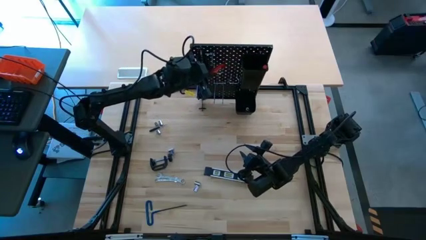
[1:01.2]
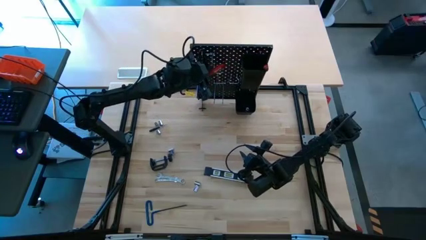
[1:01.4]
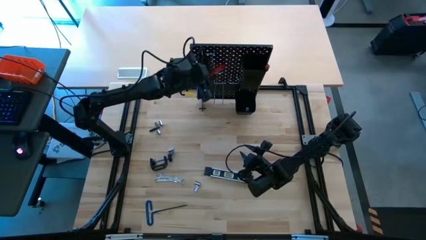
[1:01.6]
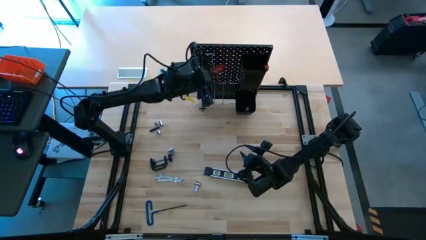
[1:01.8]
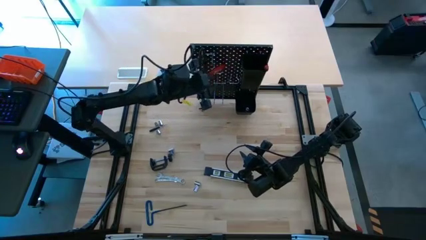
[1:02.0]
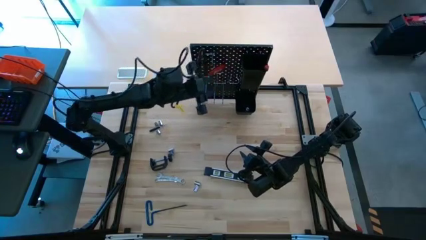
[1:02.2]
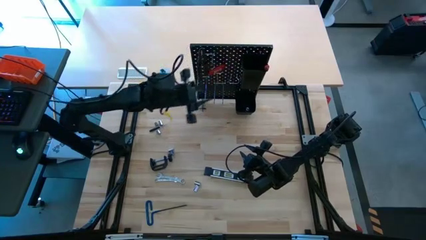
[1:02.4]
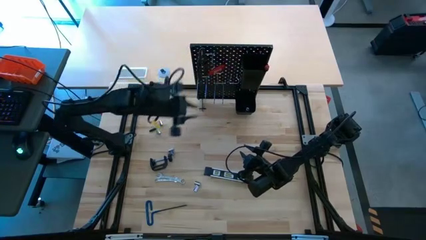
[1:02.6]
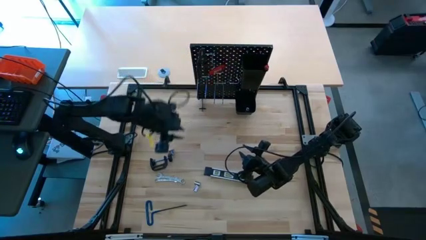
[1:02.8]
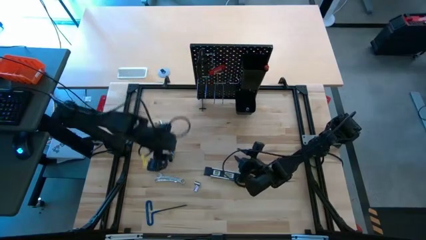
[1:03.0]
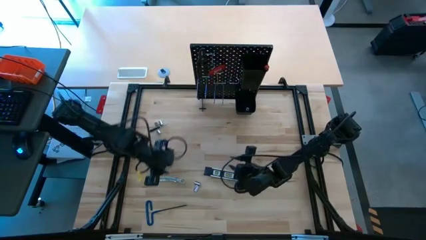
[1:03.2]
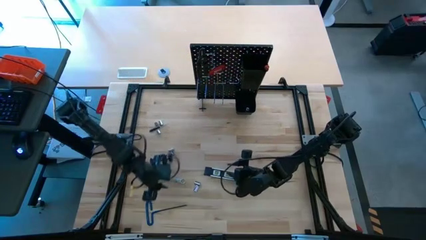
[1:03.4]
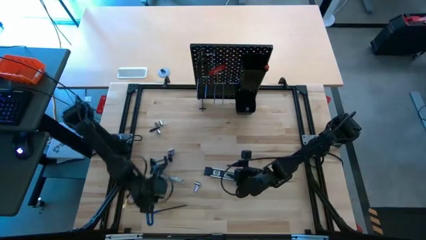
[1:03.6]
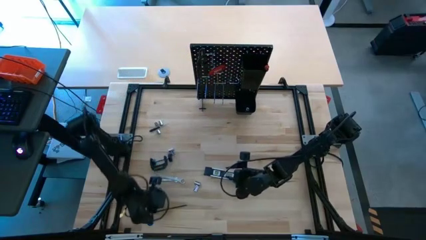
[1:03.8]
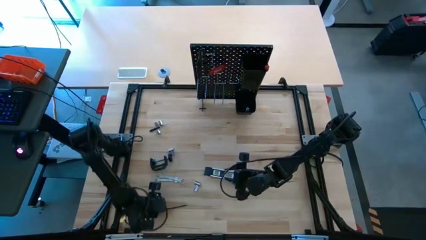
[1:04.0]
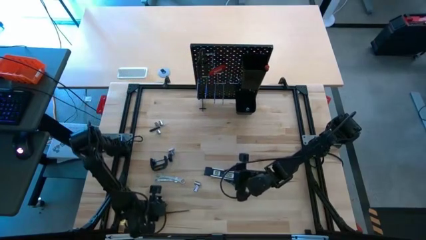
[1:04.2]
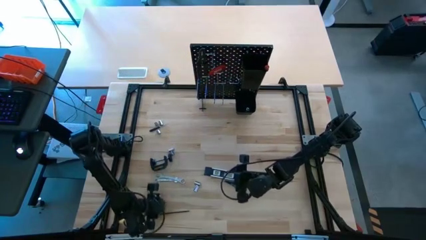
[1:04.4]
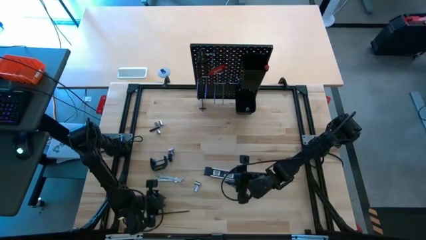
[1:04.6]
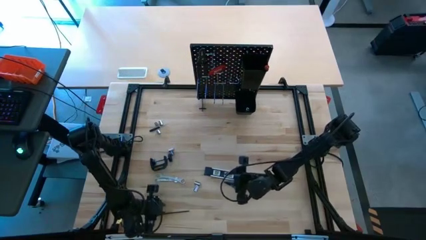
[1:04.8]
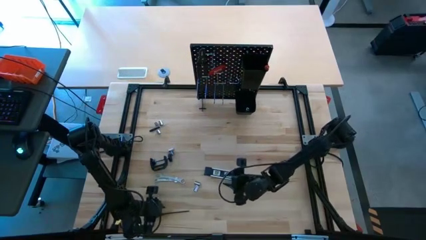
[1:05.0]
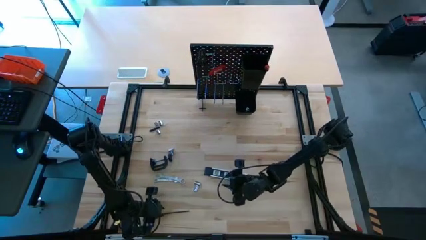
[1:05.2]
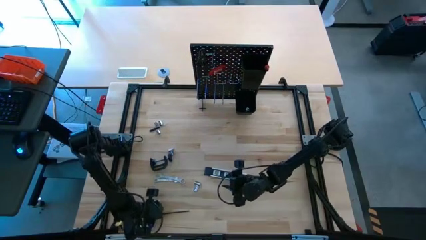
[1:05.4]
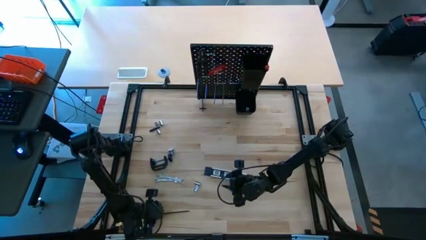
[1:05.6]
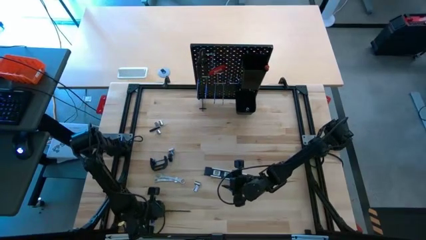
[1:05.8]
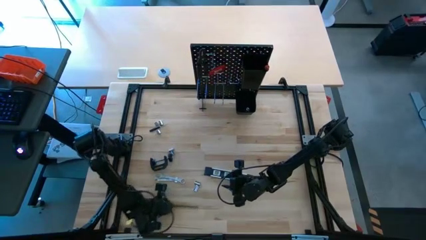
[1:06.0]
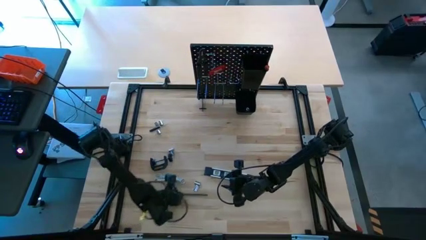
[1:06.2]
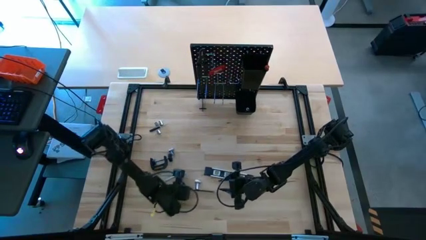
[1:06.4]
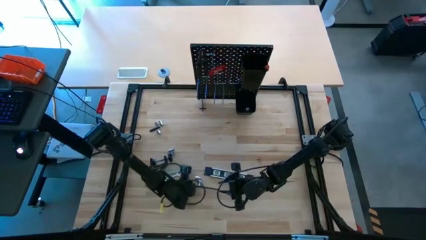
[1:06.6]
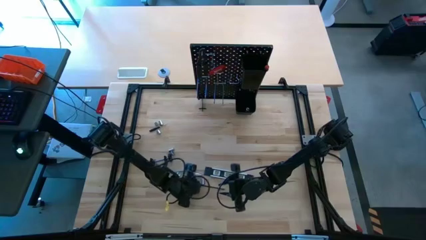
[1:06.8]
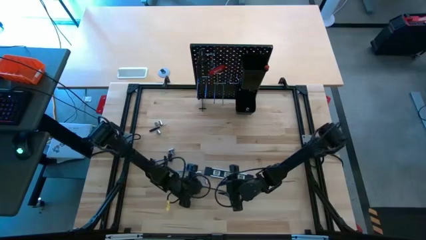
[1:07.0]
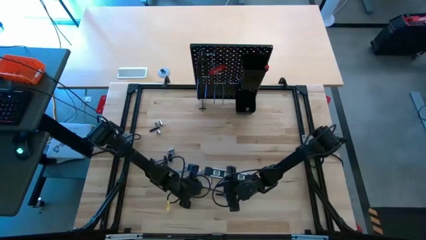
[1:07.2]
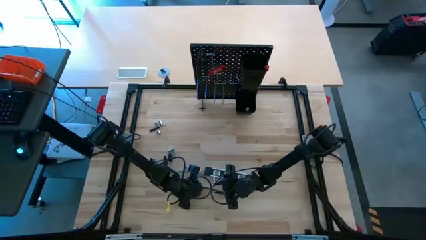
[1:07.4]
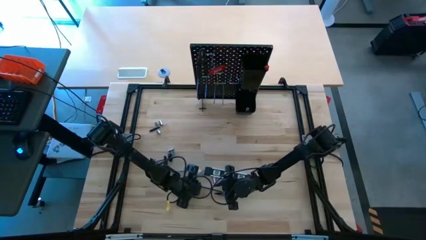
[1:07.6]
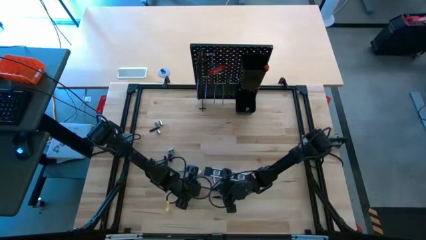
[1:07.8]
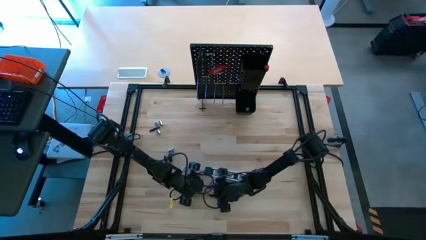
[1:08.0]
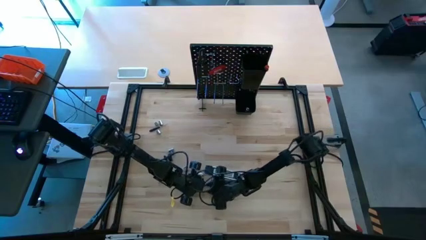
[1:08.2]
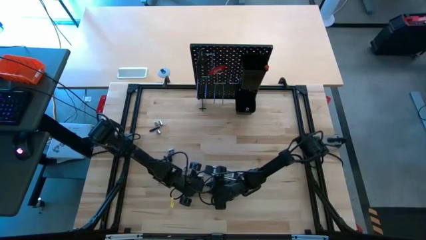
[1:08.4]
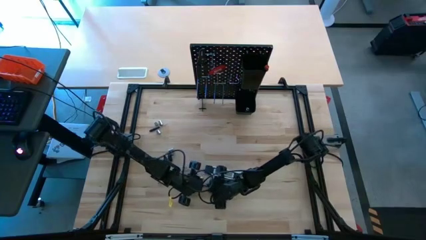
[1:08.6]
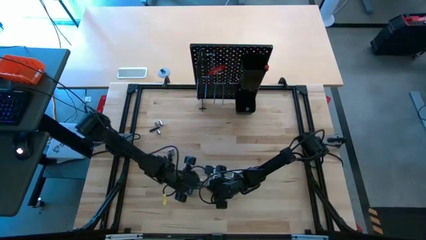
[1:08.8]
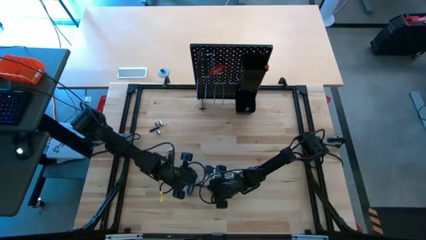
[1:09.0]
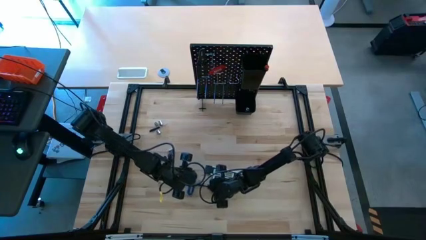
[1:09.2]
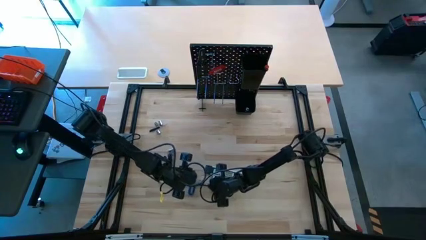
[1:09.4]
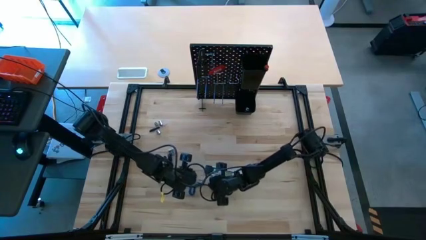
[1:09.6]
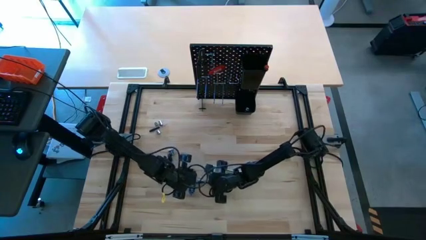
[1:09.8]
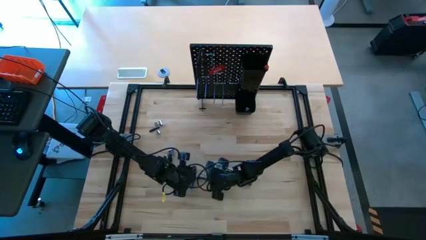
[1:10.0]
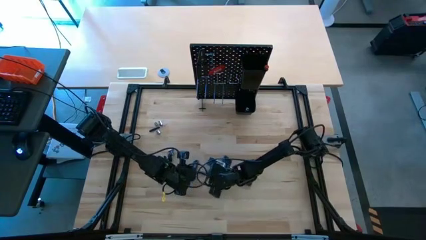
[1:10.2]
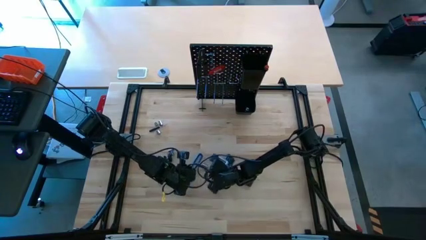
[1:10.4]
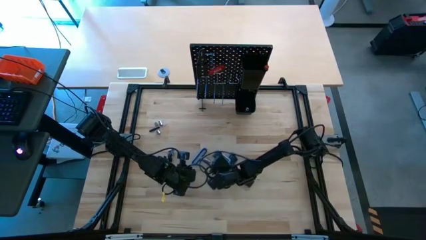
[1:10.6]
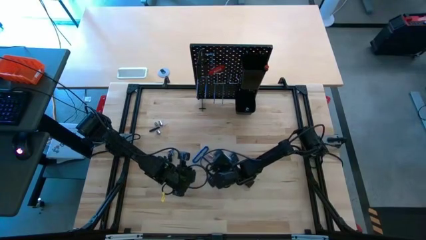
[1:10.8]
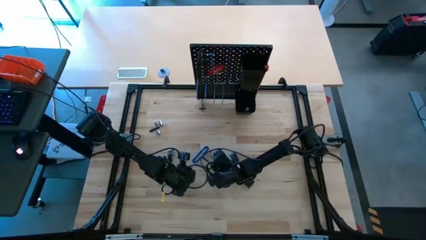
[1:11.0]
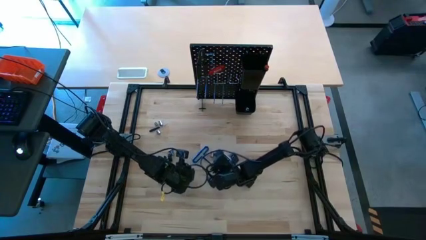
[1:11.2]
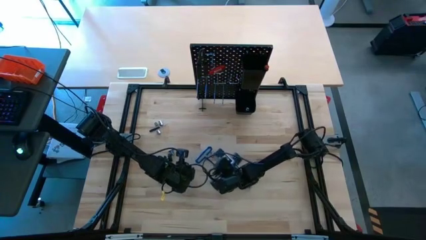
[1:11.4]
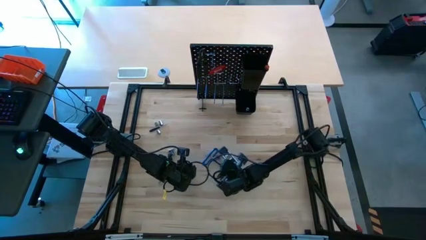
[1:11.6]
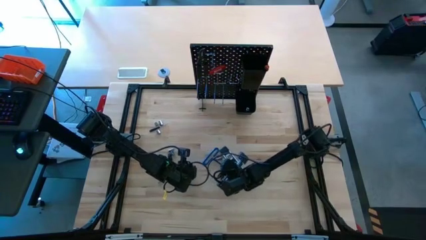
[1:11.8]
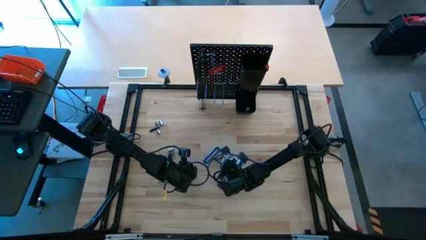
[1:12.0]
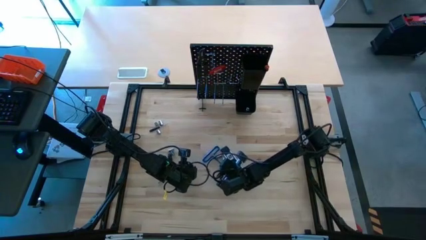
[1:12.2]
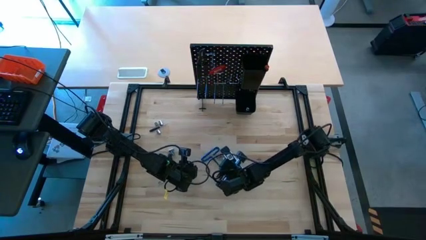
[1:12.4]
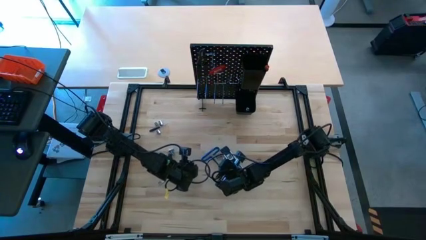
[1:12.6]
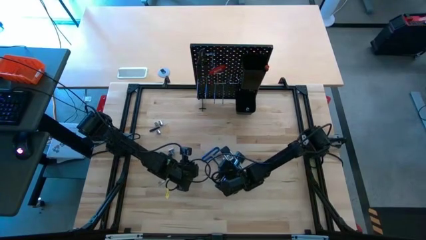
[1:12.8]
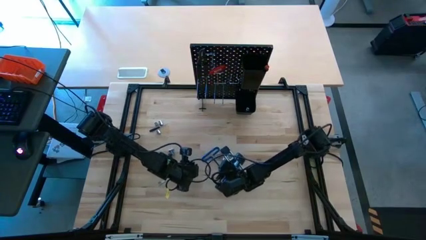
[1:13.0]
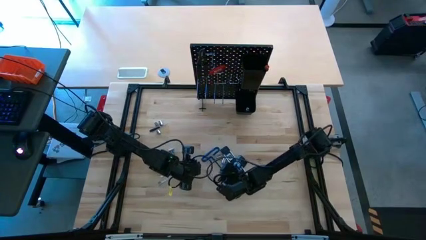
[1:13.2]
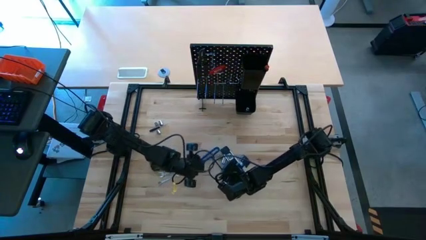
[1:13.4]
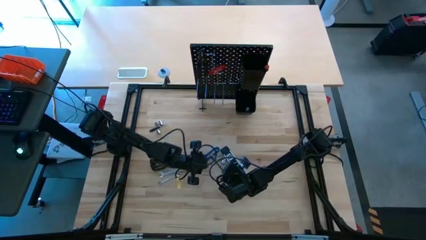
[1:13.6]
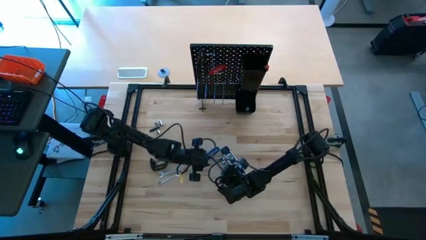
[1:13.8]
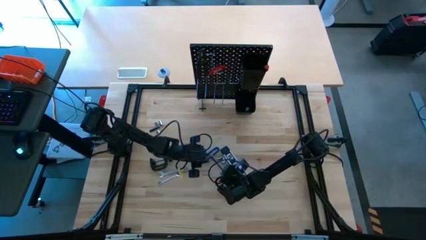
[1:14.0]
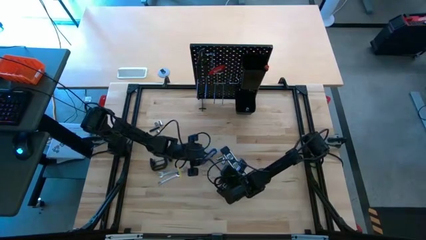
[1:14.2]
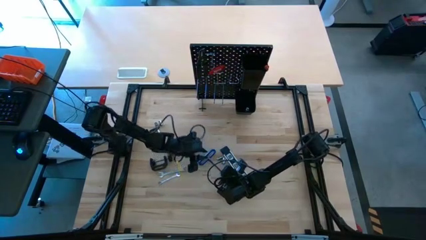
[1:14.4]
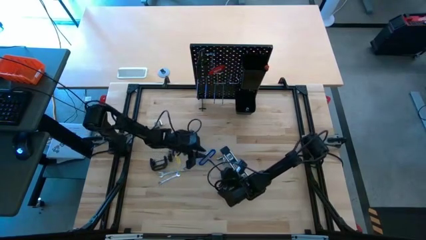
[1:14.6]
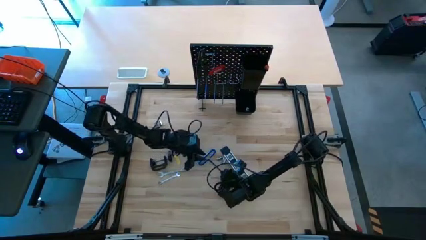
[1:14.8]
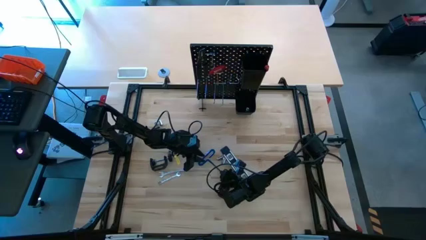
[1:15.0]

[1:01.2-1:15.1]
Task: Hang tools onto peg board
Put the pick tool into the top black bin on the peg board
